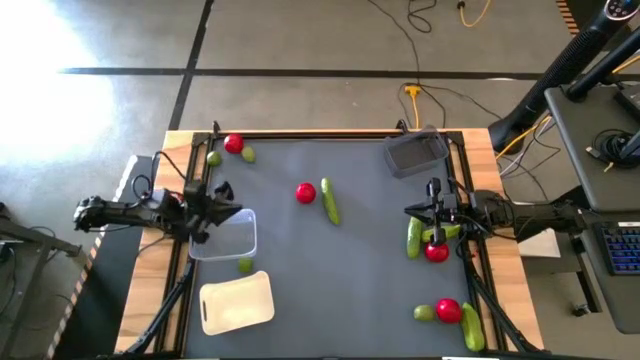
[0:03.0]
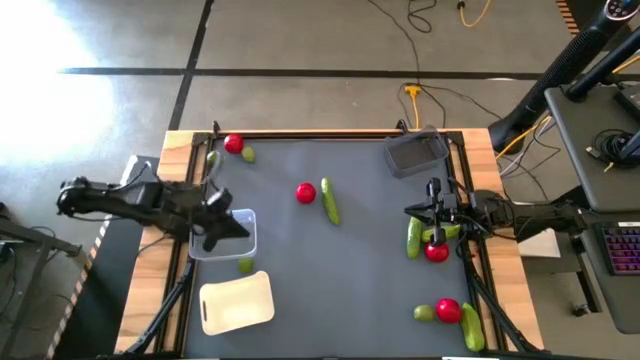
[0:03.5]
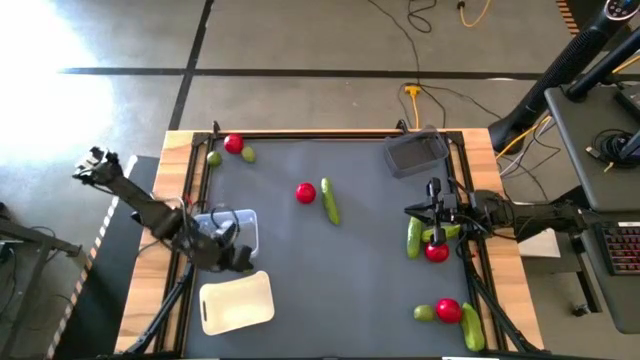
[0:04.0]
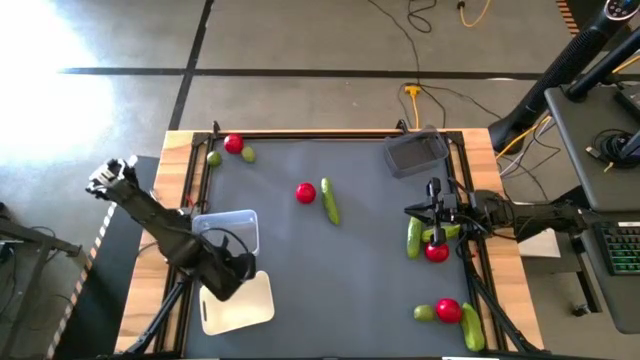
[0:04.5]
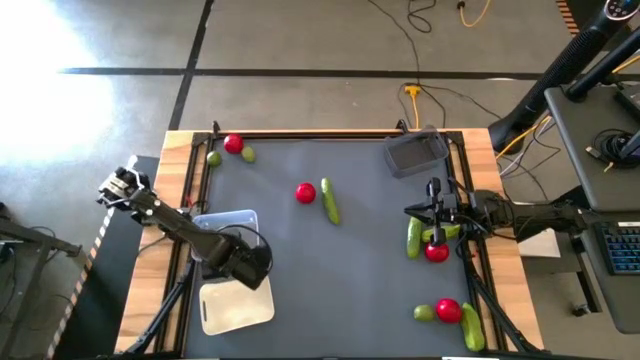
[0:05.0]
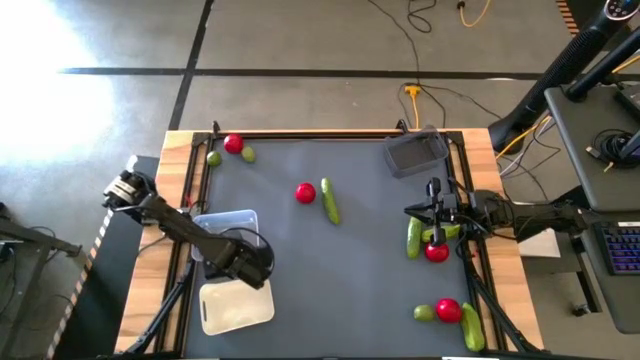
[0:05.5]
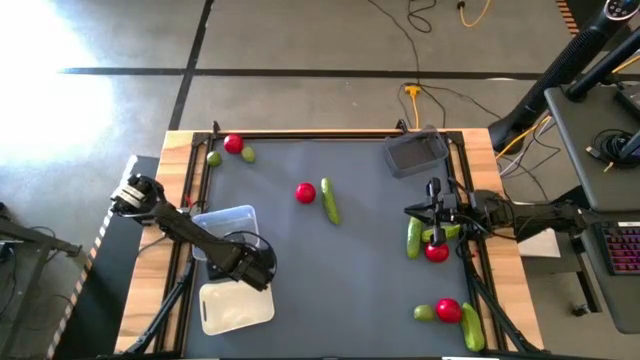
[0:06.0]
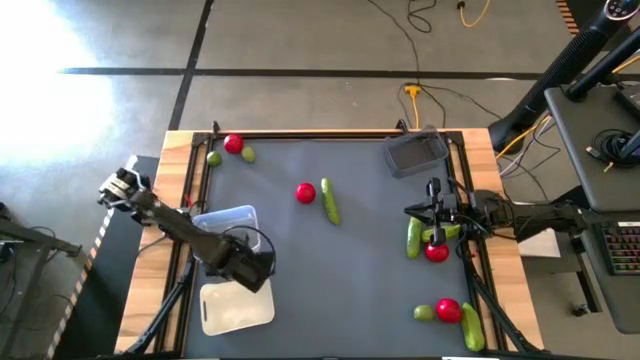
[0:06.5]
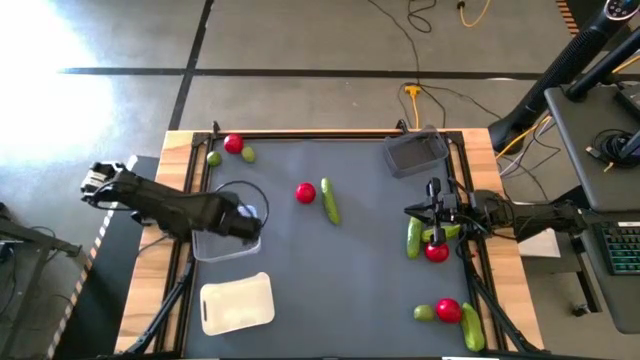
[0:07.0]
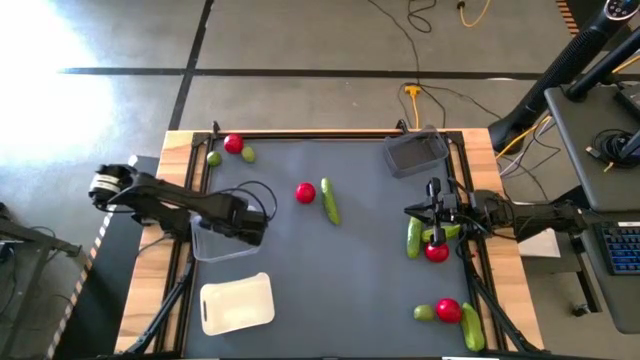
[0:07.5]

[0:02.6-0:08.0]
Task: Sort produce into baskets
Put the lime into the transparent bin

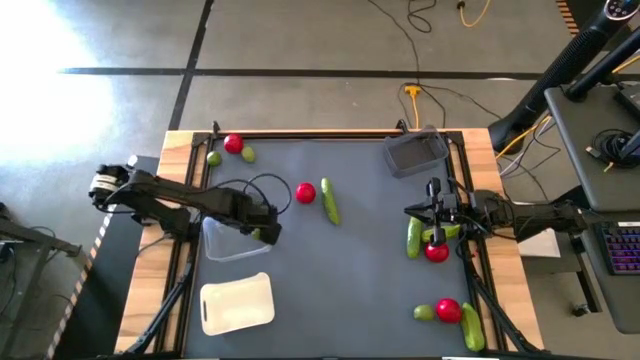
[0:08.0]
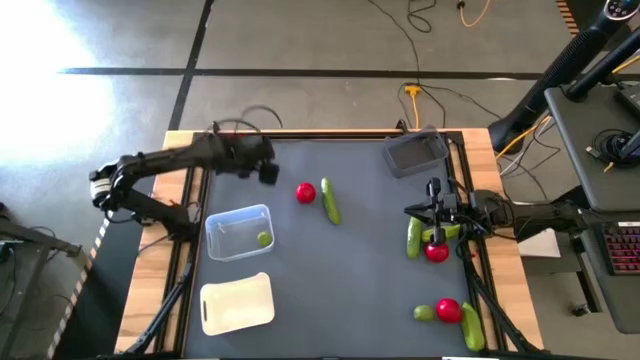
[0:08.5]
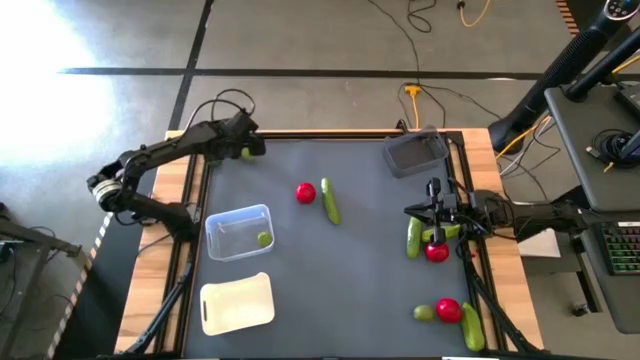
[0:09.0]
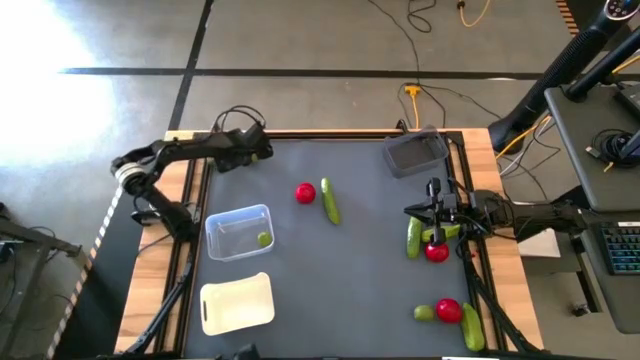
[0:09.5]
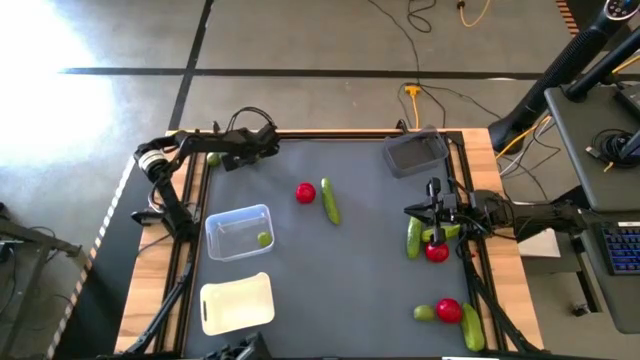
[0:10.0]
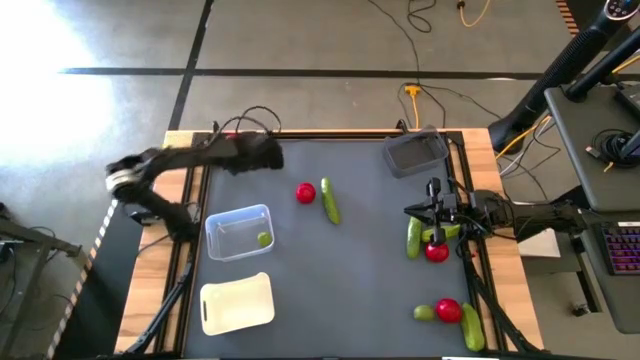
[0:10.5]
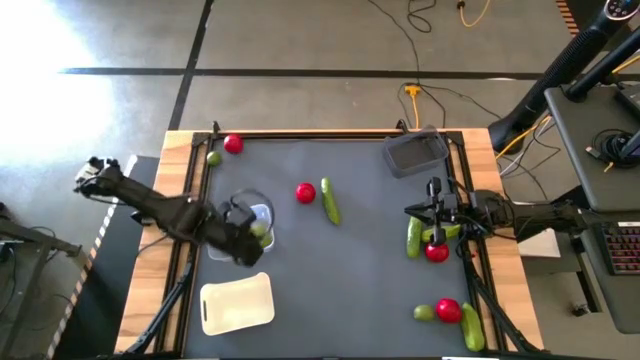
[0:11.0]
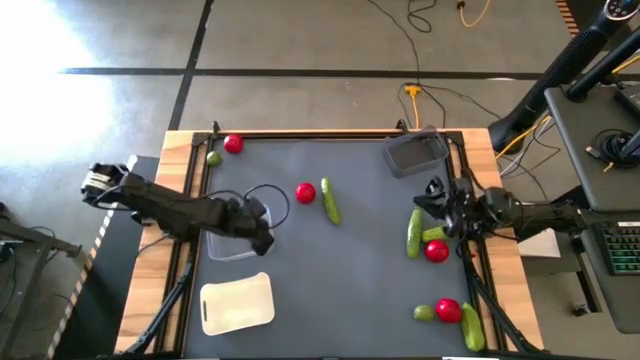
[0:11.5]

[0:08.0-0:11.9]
Put the lime into the transparent bin

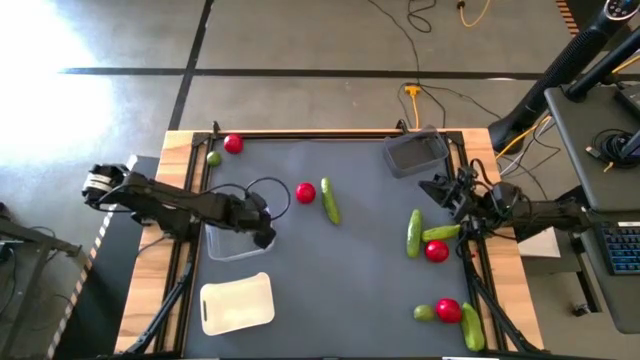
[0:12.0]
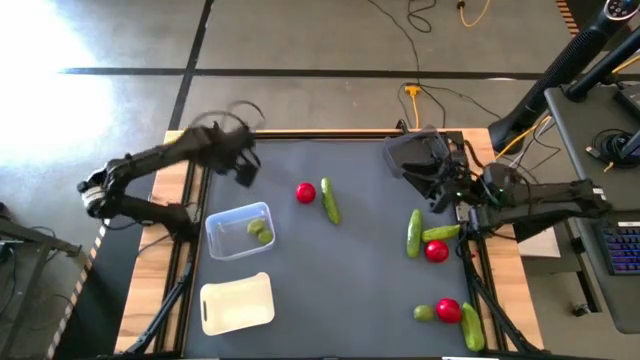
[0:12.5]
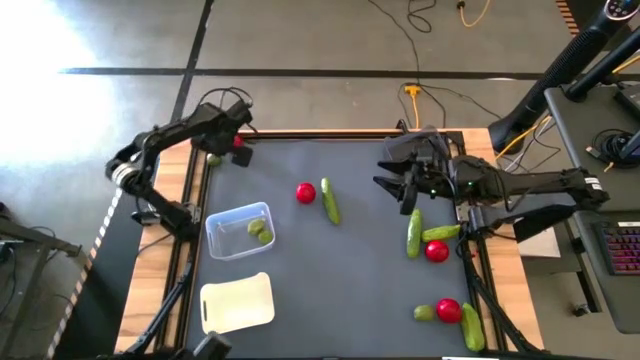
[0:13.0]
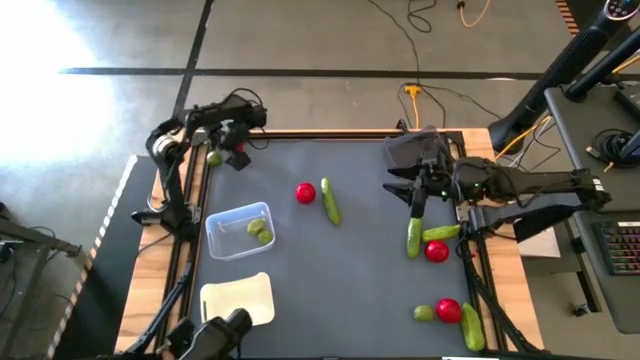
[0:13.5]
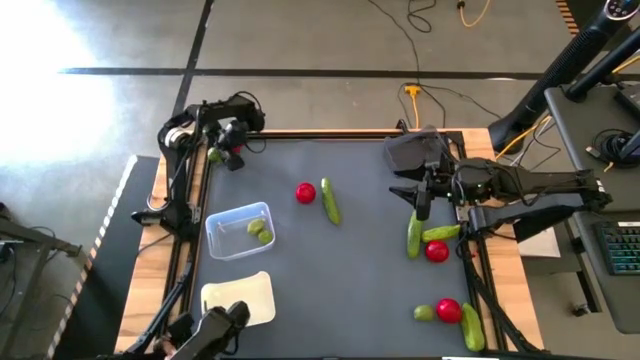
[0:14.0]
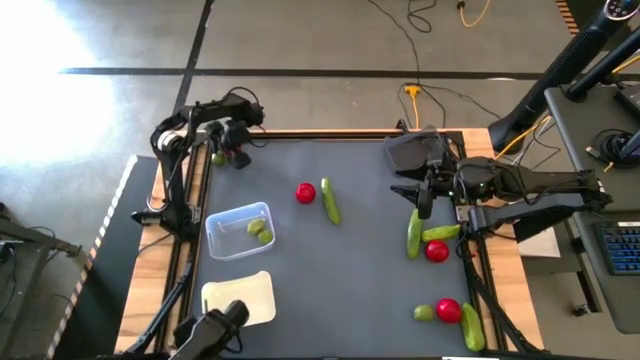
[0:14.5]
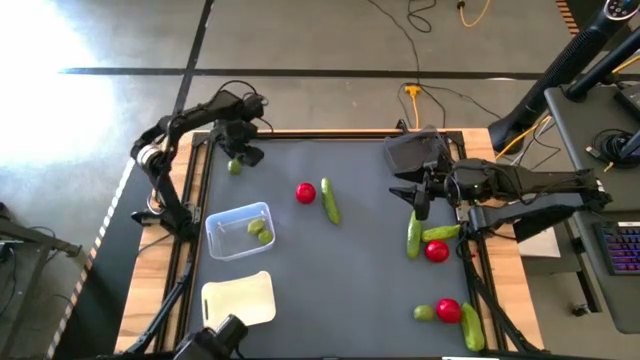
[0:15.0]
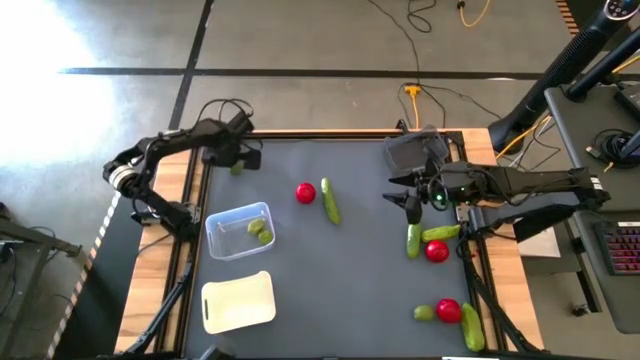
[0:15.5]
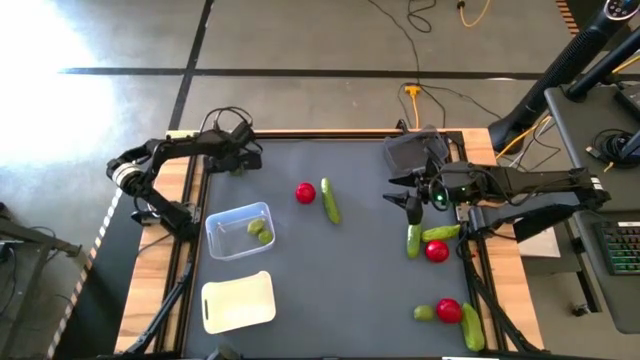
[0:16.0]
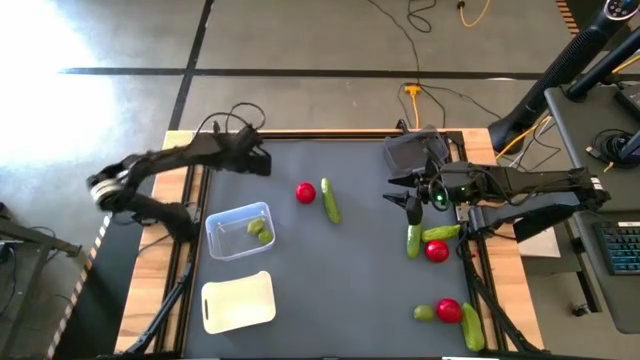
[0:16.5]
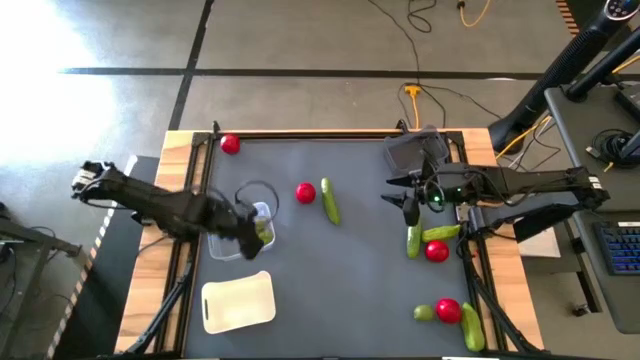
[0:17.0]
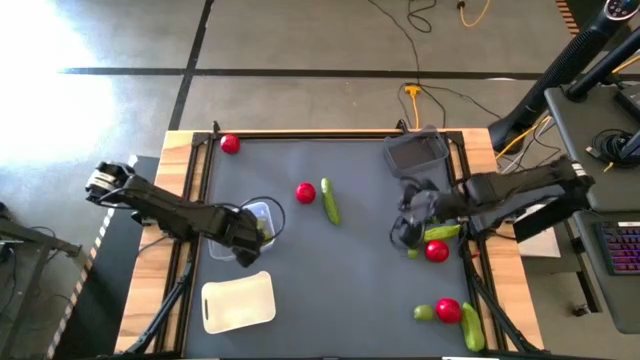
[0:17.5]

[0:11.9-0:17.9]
Put the lime into the transparent bin

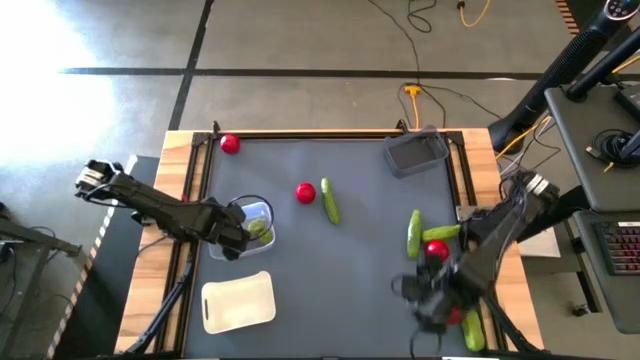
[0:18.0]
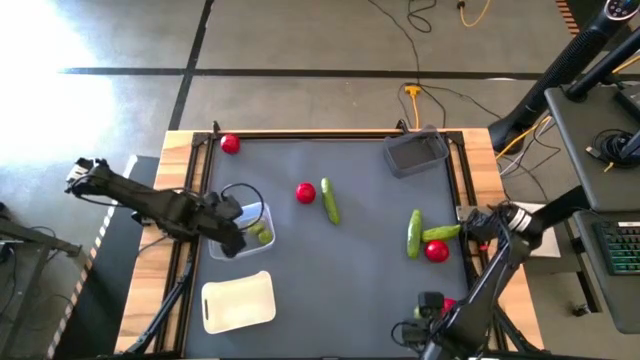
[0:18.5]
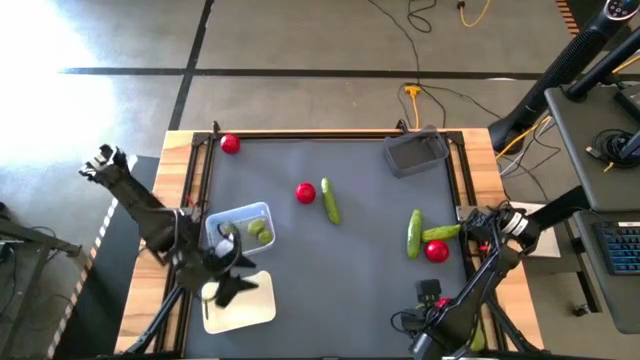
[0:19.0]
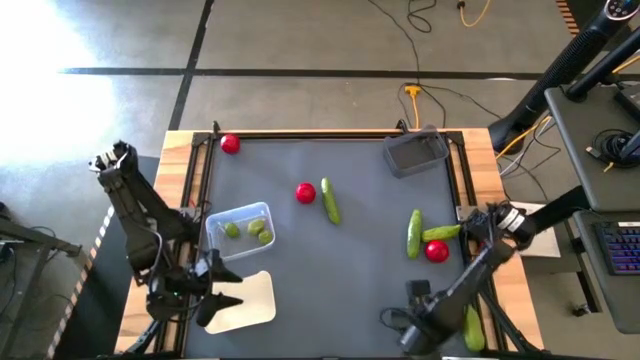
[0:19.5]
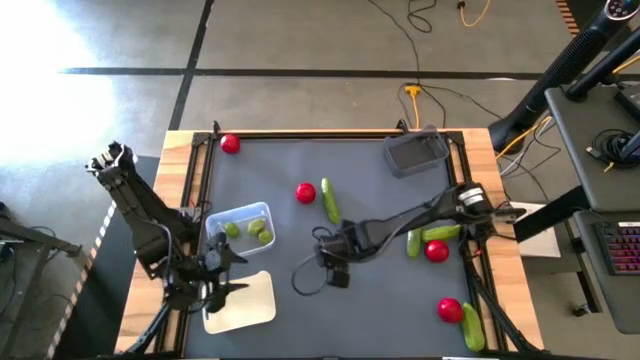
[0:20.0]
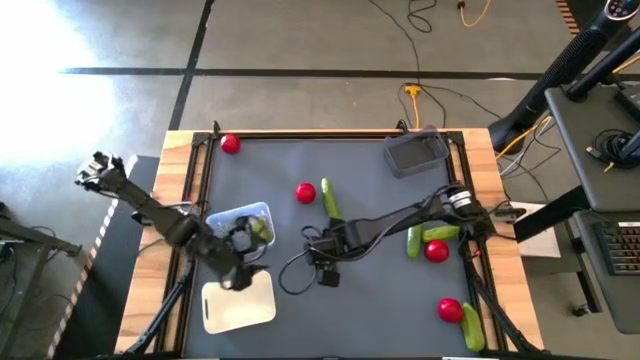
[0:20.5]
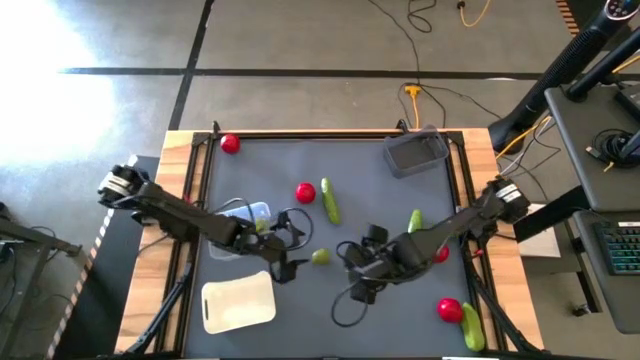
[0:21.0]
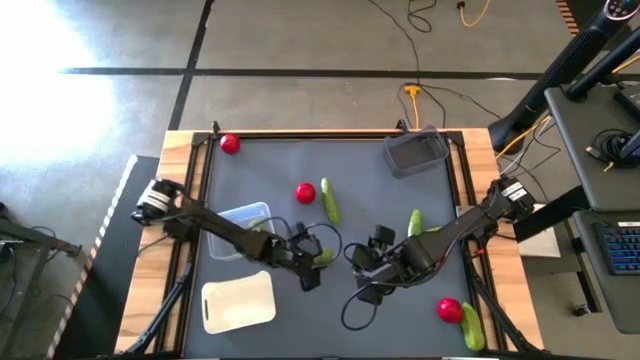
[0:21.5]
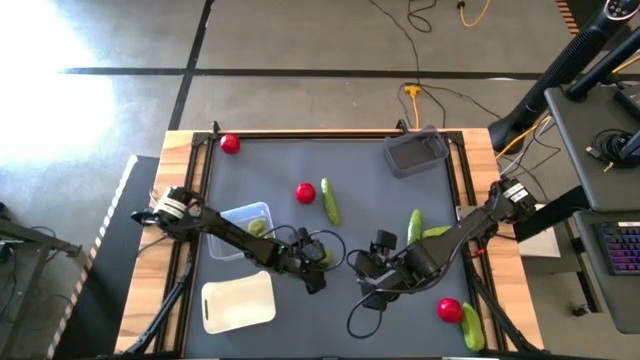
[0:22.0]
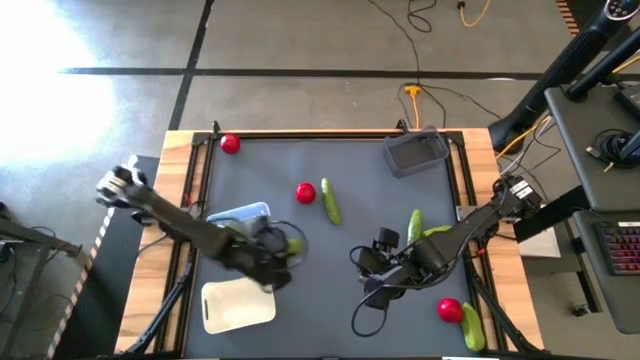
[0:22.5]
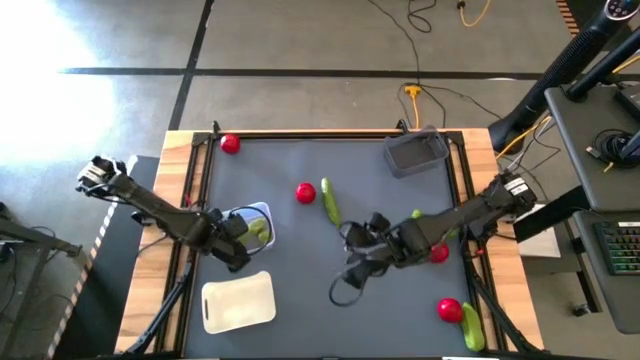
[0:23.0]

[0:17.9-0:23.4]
Put the lime into the transparent bin

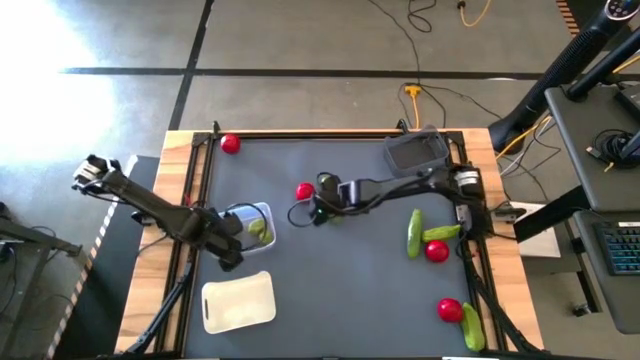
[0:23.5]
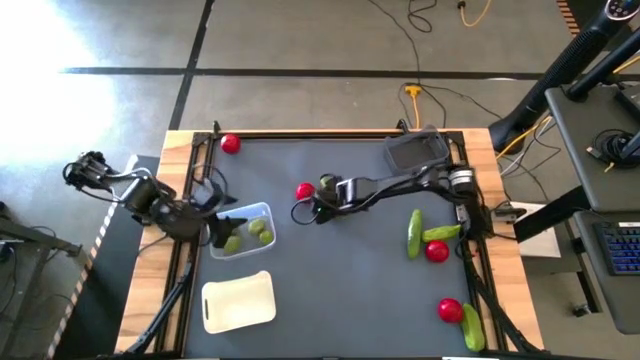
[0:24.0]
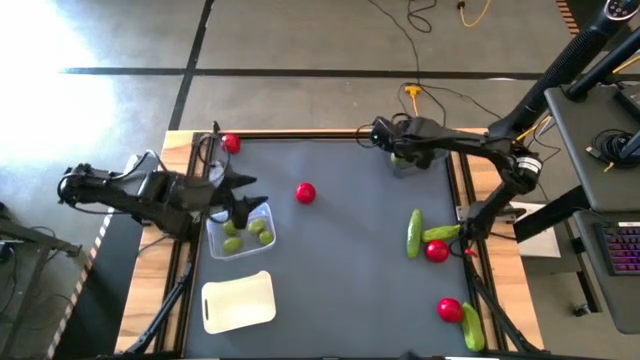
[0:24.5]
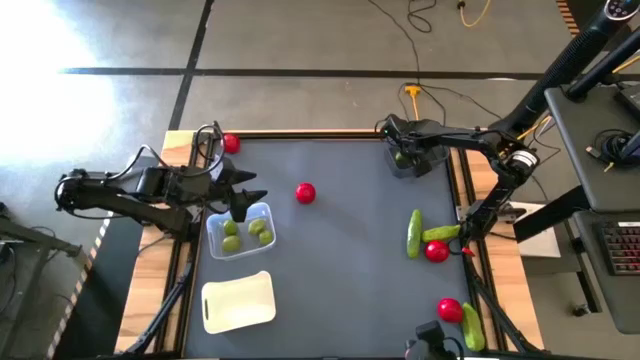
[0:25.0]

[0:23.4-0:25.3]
Put the cucumber into the black bin
